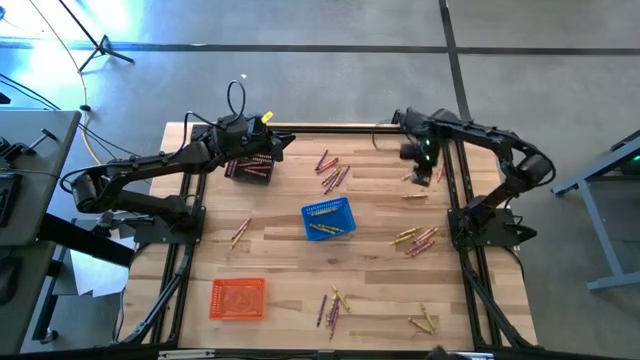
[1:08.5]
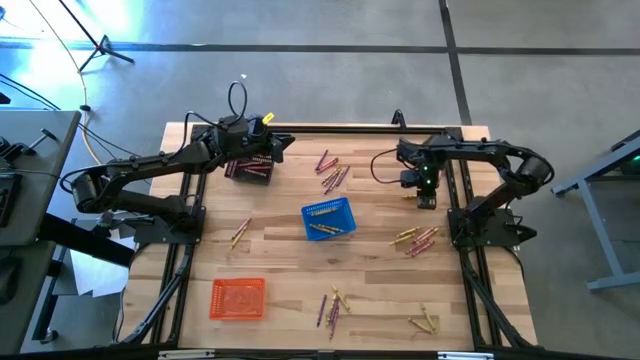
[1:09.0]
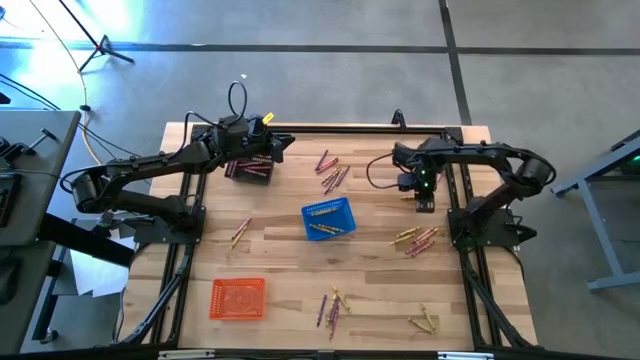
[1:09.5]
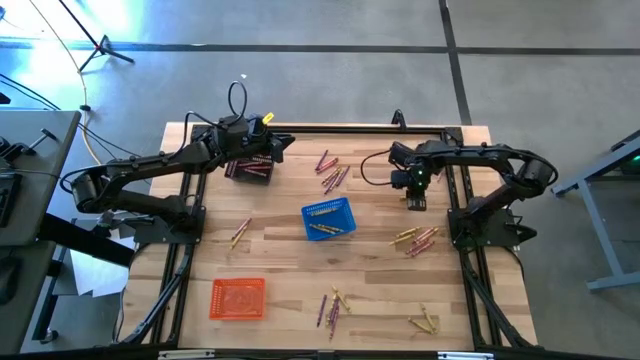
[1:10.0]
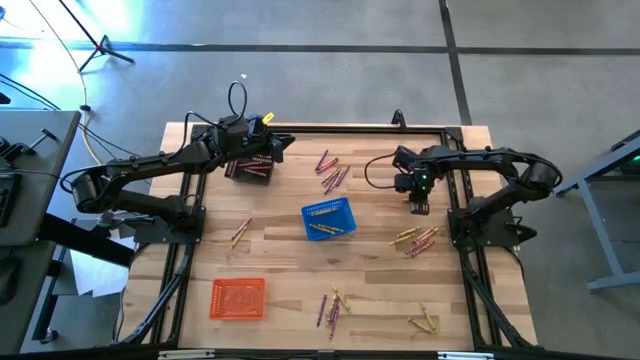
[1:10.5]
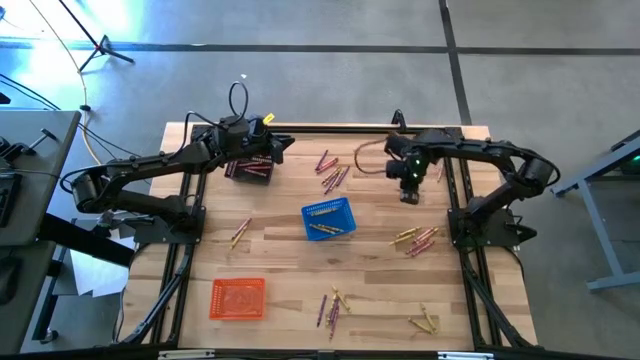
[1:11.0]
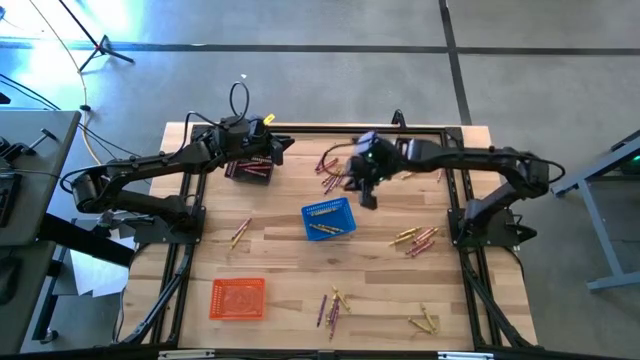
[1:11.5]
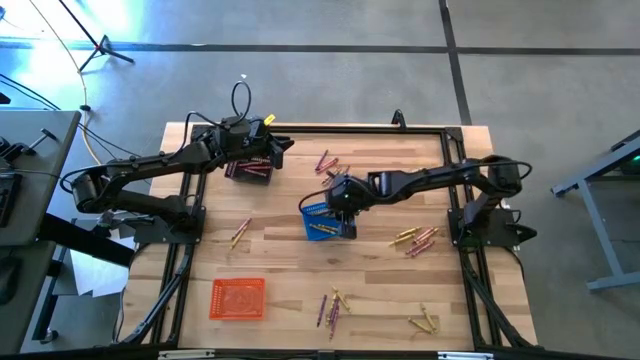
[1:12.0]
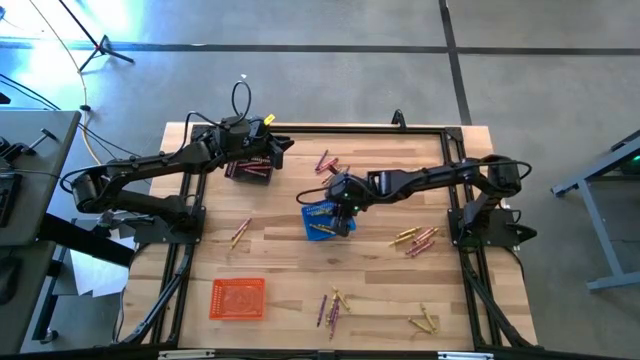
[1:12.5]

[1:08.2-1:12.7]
Task: Sort crayons
Put the yellow crayon into the blue basket

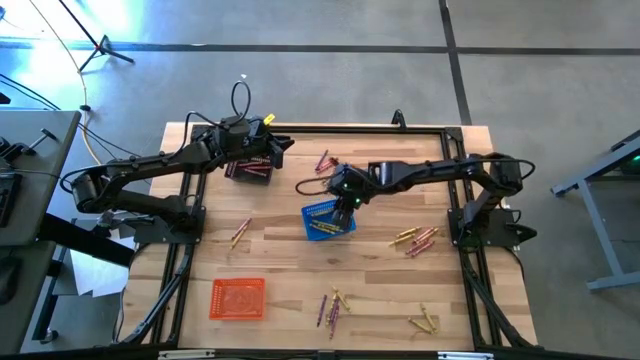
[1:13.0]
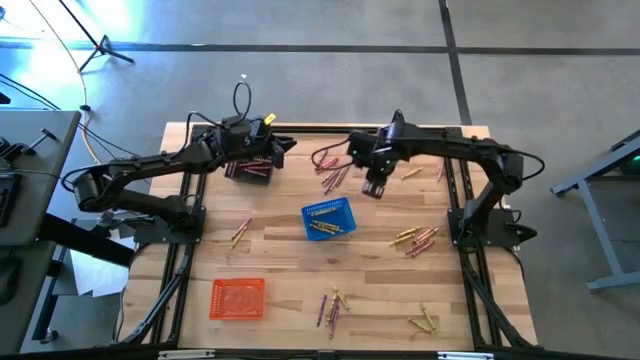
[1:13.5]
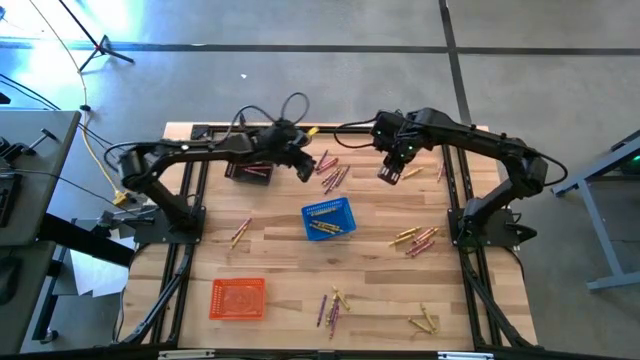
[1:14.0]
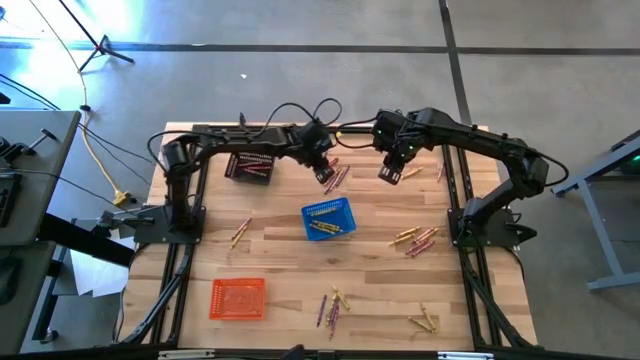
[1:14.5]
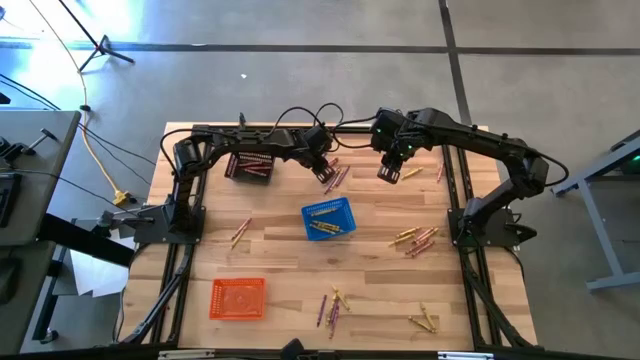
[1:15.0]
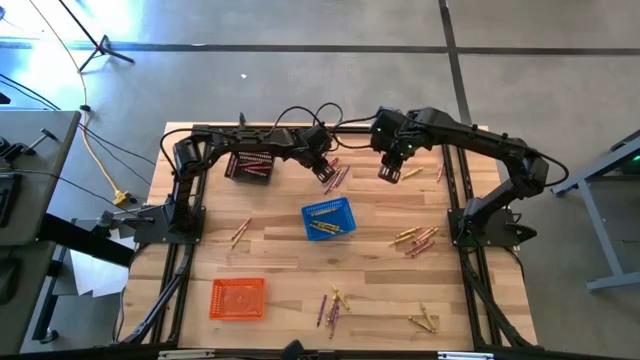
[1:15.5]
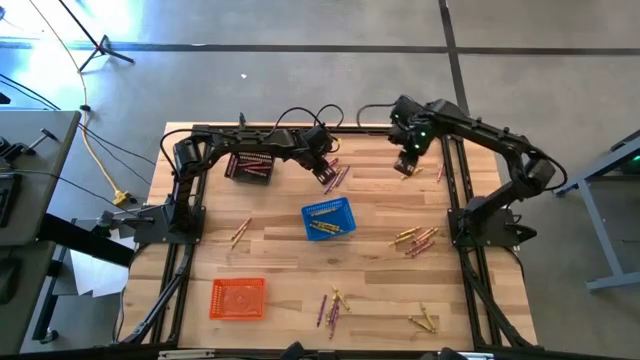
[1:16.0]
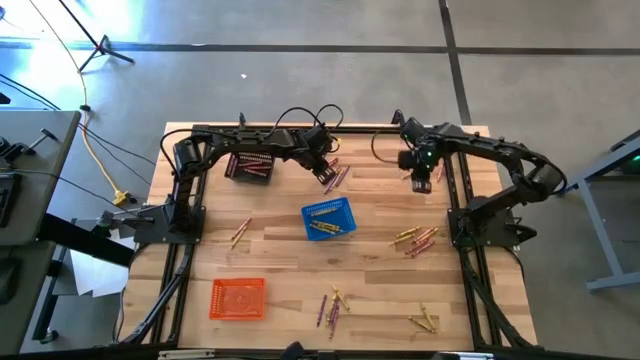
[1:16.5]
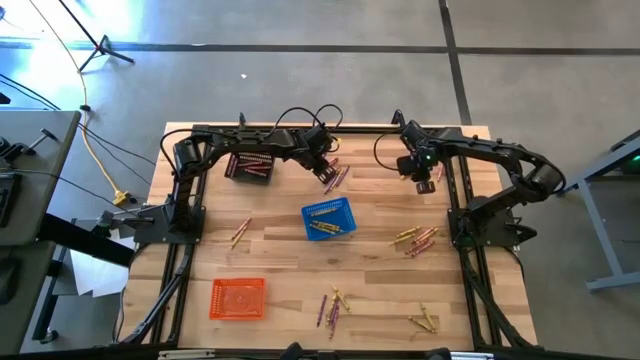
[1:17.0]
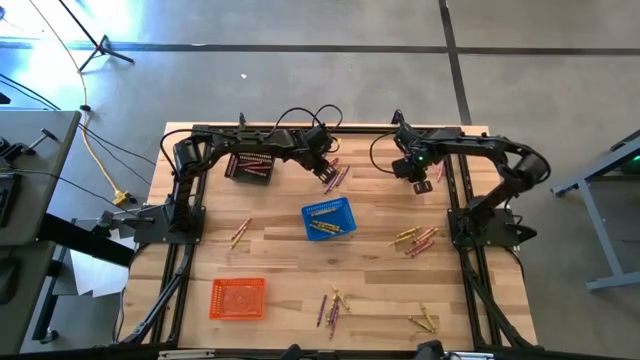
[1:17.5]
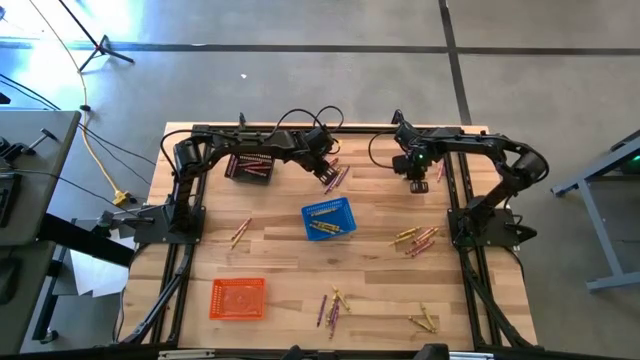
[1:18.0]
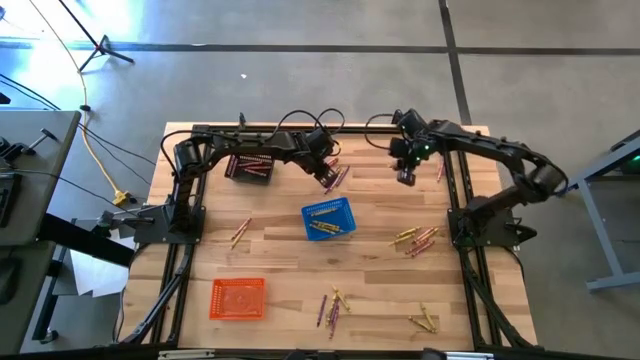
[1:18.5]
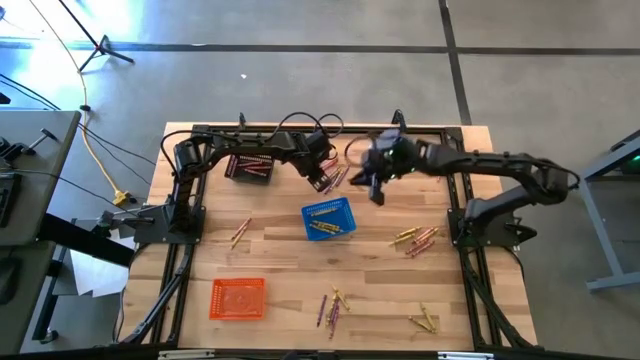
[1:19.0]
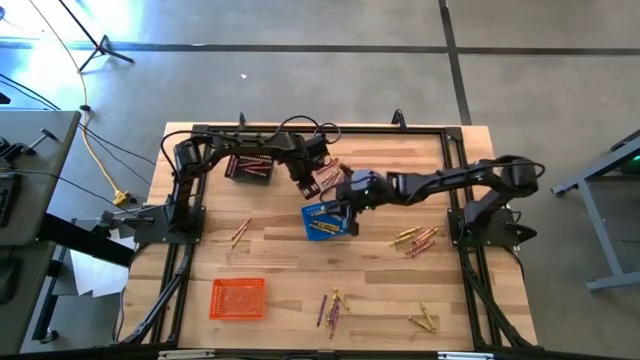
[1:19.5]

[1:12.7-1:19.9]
Put the yellow crayon into the blue basket

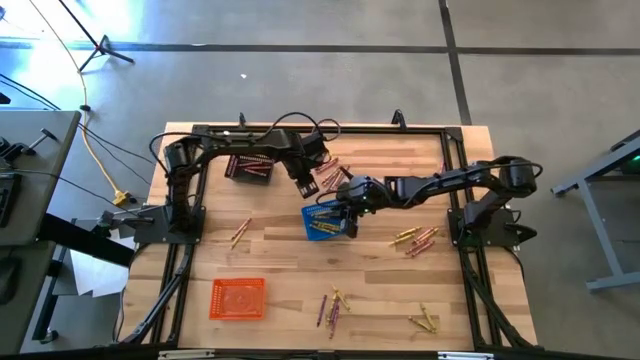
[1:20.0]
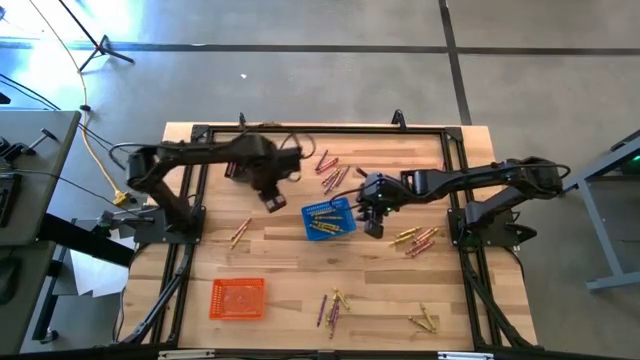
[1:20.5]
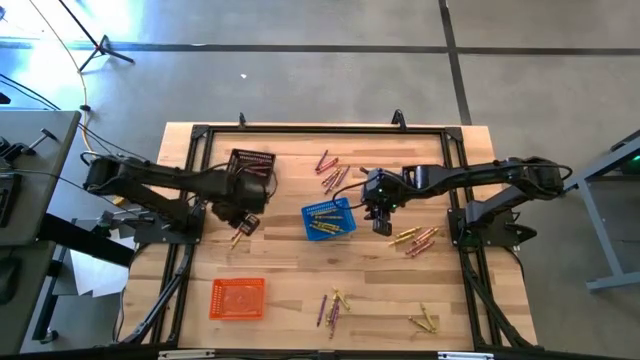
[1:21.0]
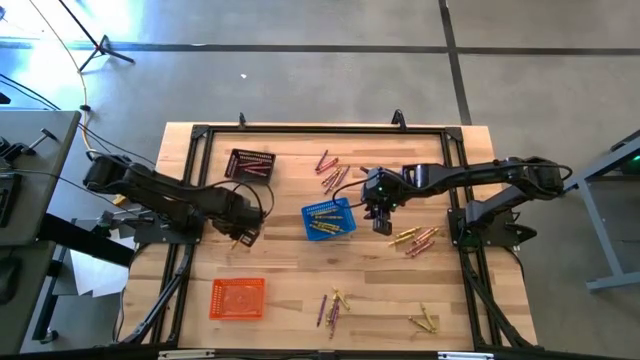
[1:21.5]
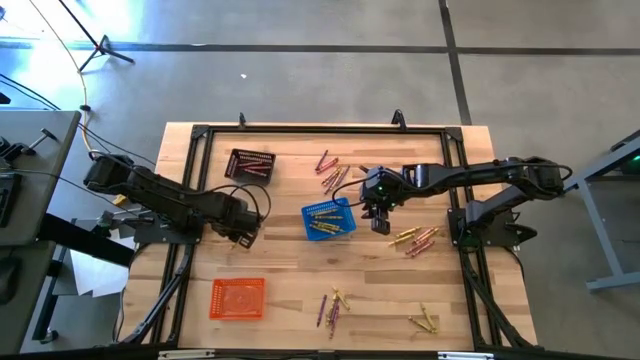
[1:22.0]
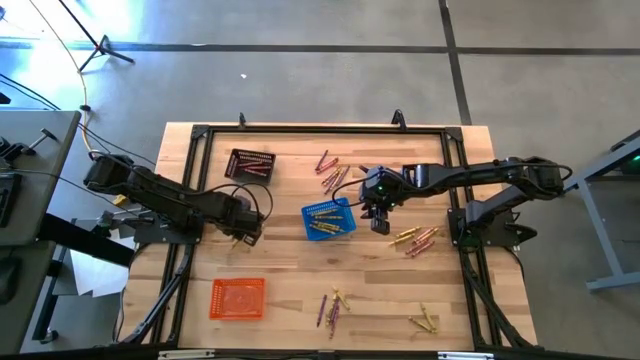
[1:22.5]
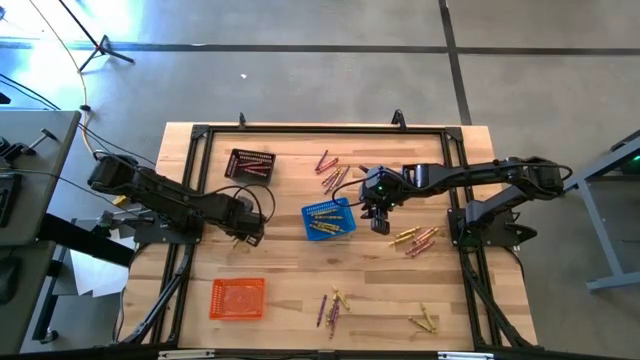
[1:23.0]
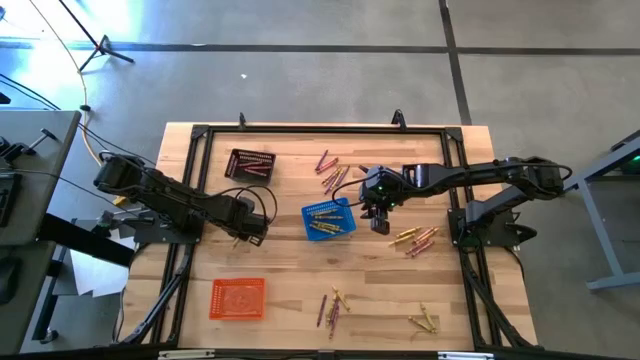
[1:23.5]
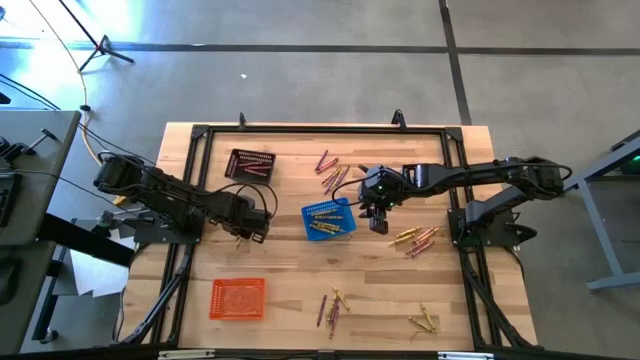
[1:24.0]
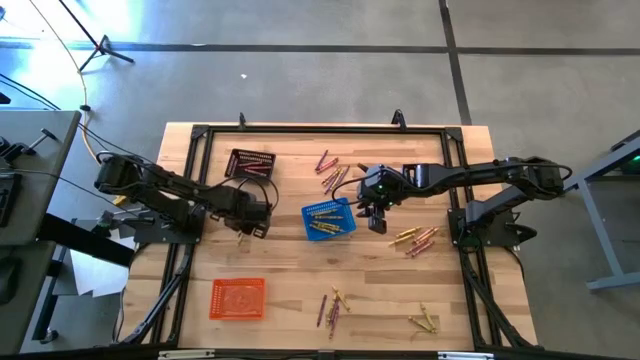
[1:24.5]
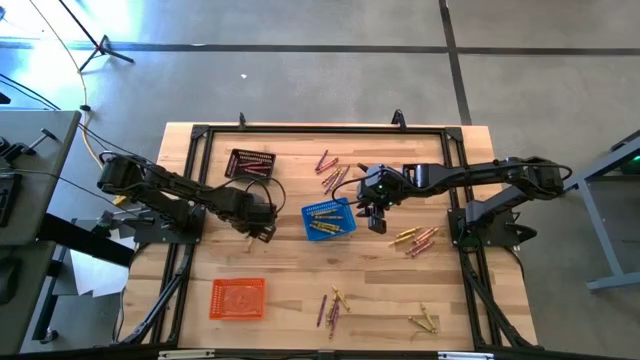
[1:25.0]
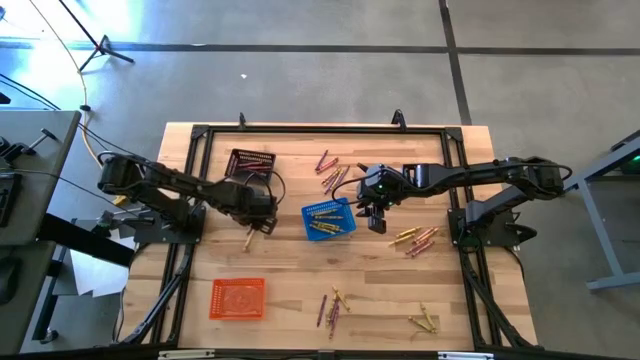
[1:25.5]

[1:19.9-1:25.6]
Put the red crayon into the black basket

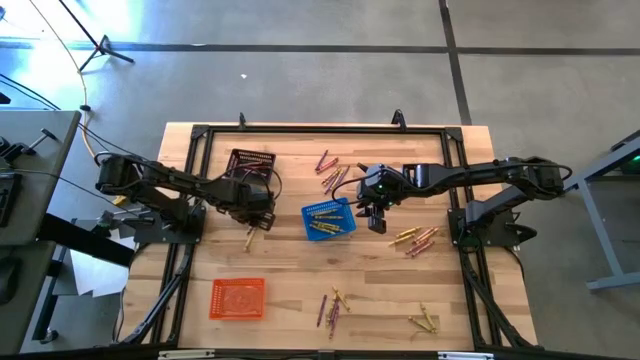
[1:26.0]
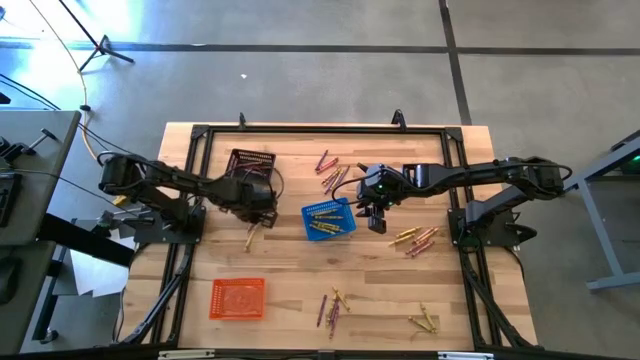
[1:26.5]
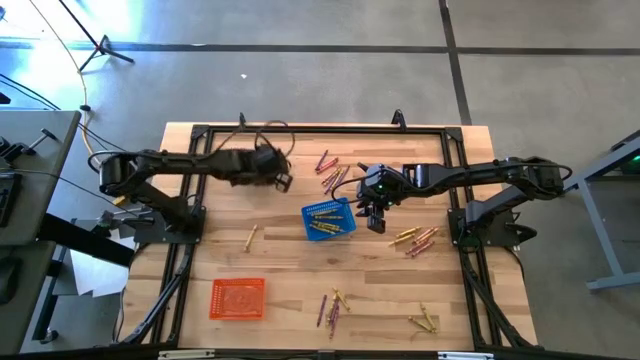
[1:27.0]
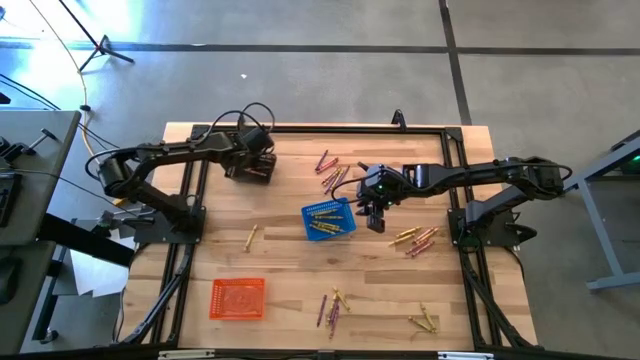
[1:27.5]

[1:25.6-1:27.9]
Put the red crayon into the black basket

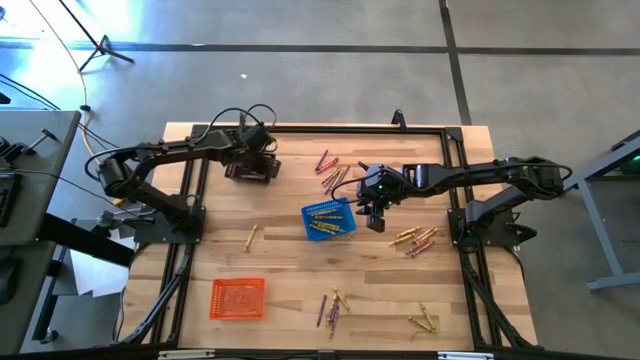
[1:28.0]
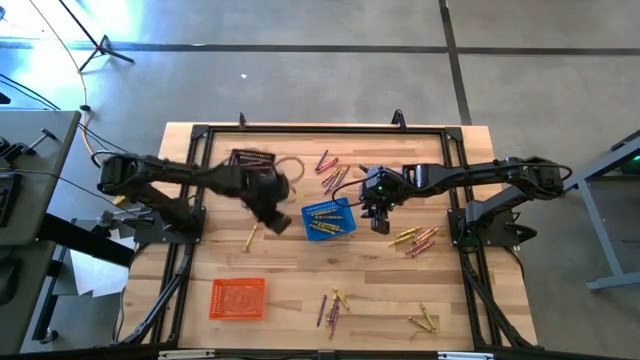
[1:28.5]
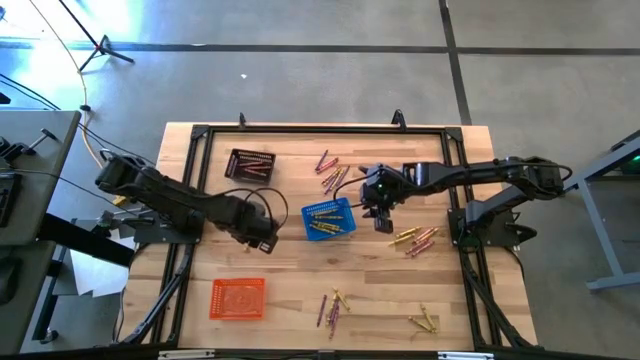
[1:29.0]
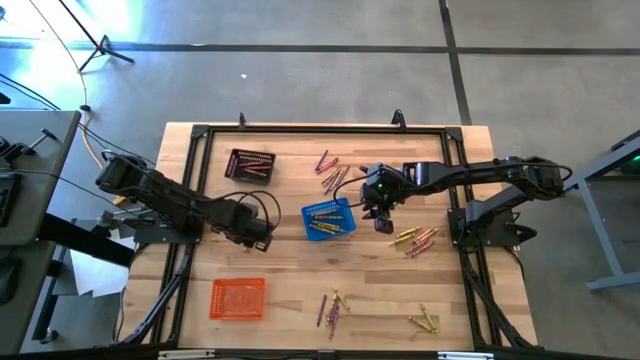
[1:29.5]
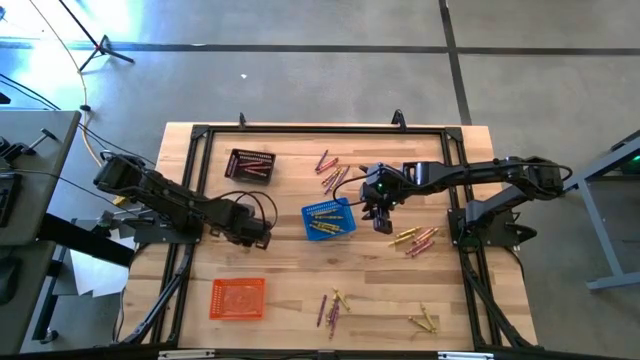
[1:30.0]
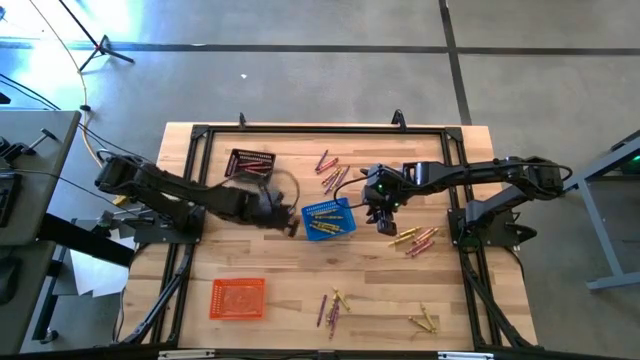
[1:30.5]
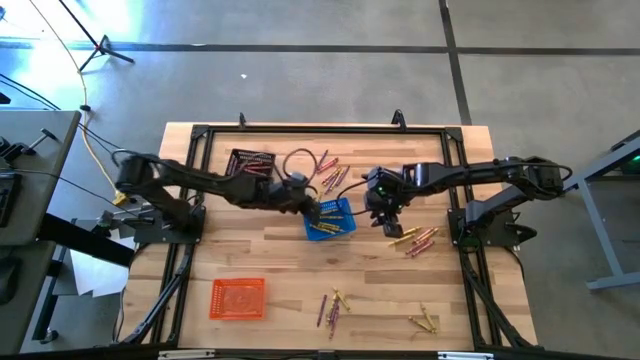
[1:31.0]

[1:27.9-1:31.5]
Put the yellow crayon into the blue basket
